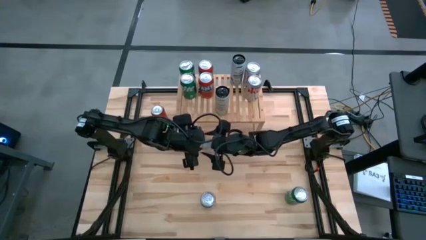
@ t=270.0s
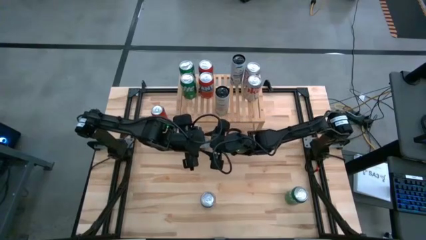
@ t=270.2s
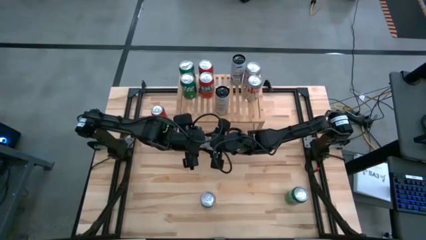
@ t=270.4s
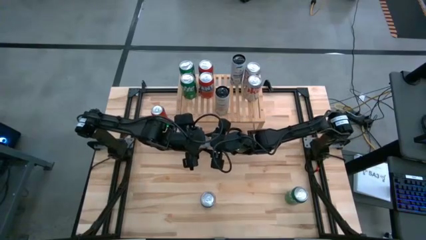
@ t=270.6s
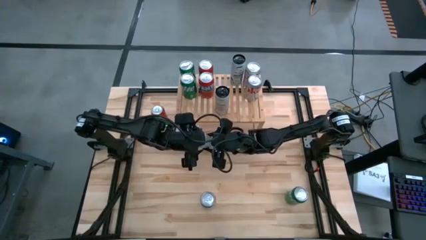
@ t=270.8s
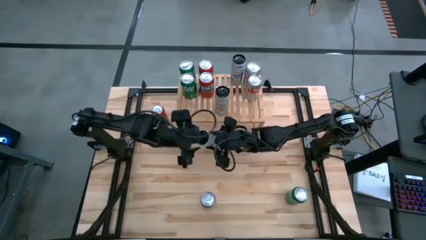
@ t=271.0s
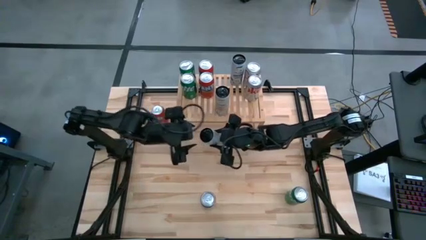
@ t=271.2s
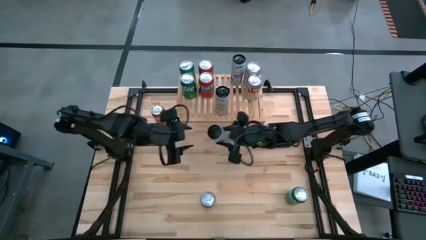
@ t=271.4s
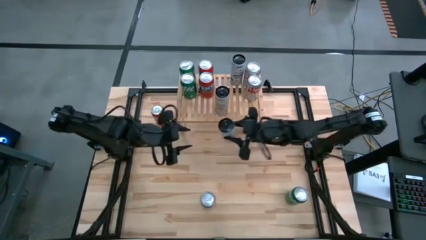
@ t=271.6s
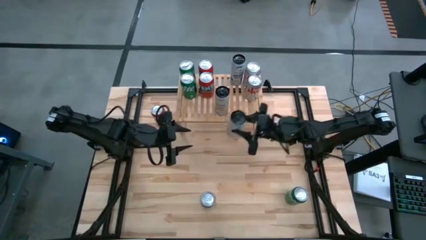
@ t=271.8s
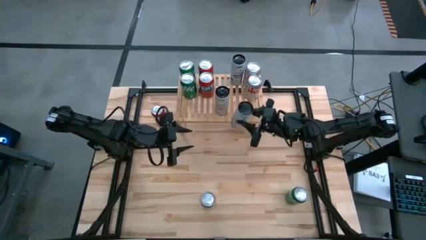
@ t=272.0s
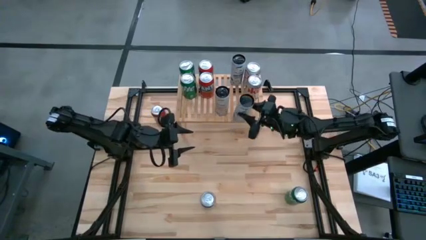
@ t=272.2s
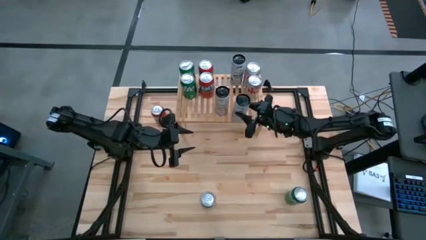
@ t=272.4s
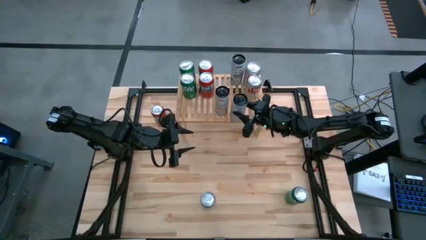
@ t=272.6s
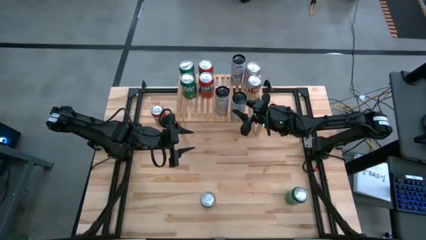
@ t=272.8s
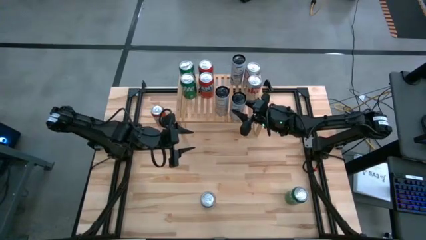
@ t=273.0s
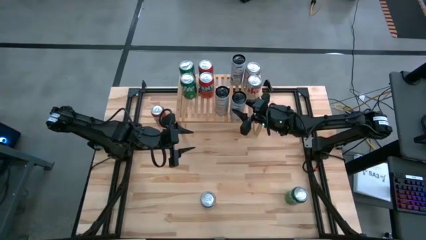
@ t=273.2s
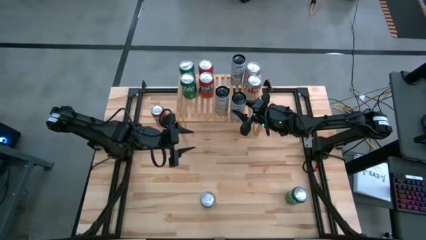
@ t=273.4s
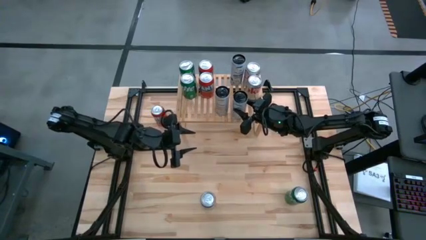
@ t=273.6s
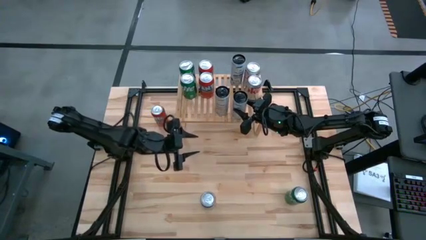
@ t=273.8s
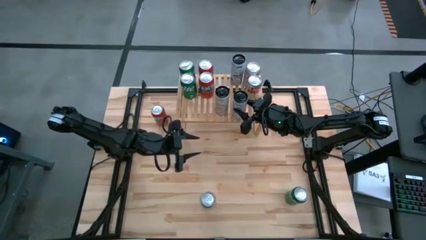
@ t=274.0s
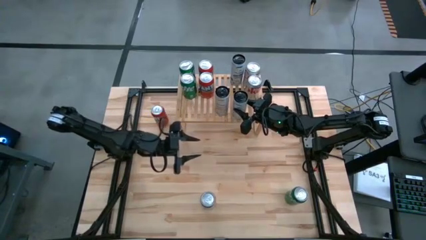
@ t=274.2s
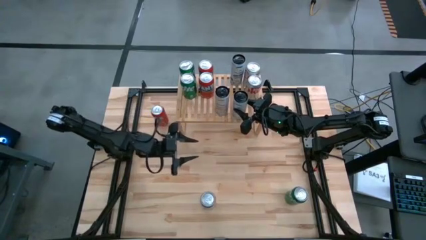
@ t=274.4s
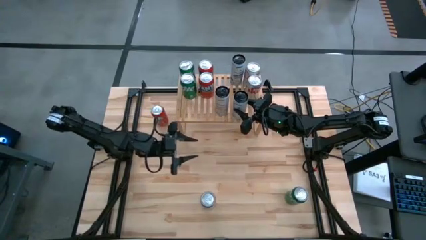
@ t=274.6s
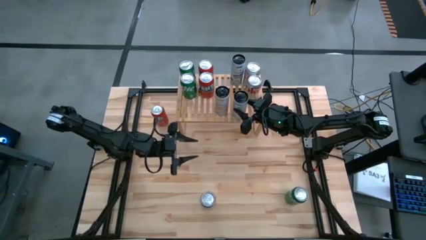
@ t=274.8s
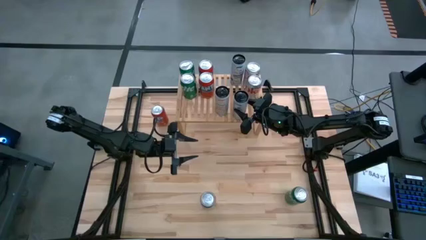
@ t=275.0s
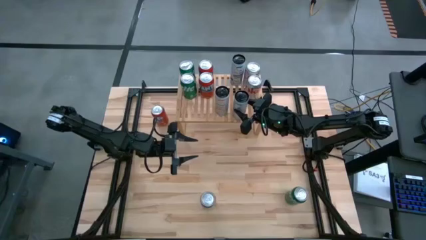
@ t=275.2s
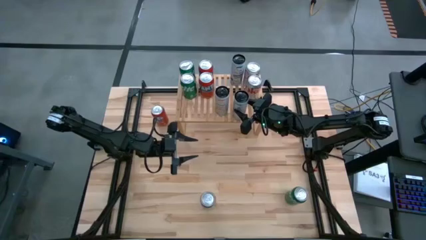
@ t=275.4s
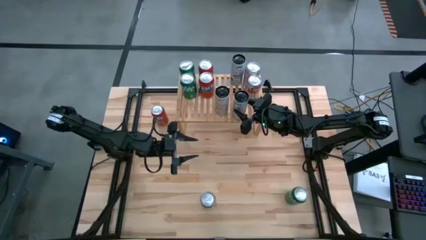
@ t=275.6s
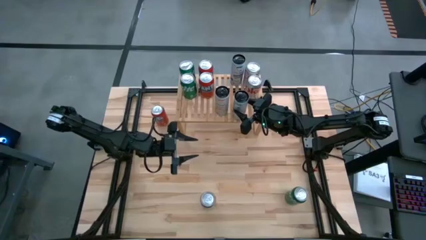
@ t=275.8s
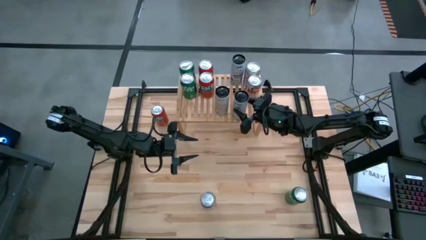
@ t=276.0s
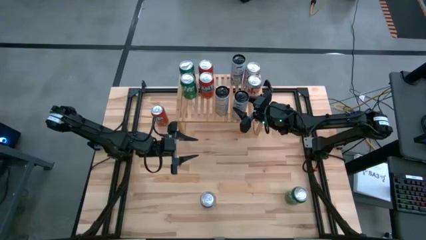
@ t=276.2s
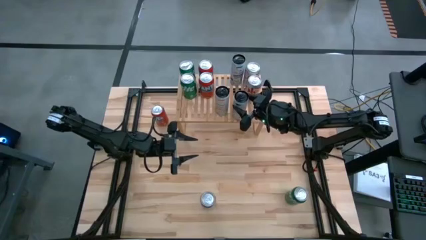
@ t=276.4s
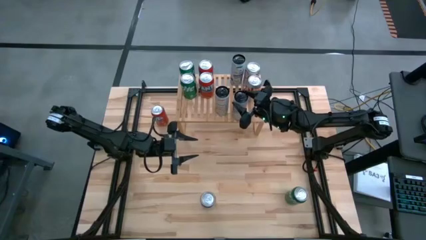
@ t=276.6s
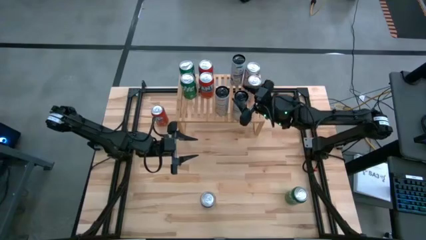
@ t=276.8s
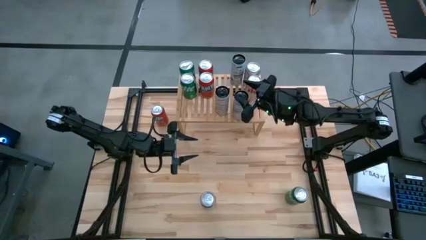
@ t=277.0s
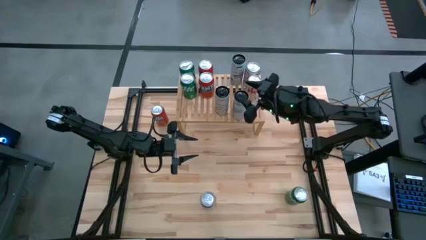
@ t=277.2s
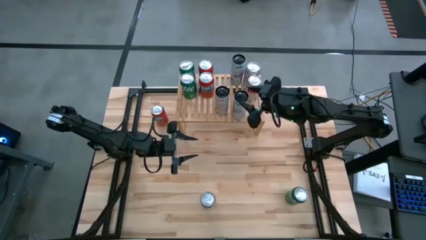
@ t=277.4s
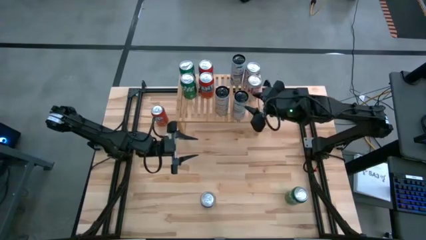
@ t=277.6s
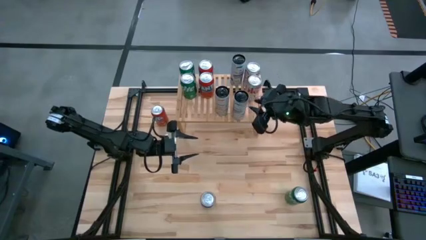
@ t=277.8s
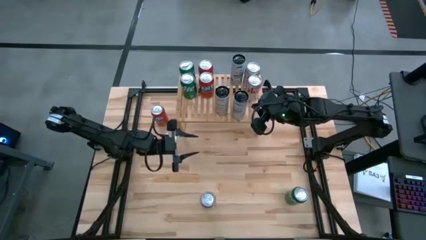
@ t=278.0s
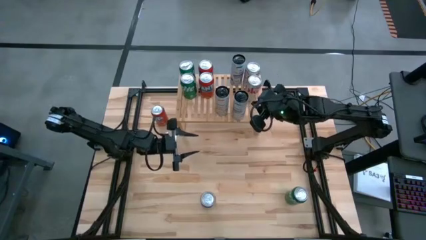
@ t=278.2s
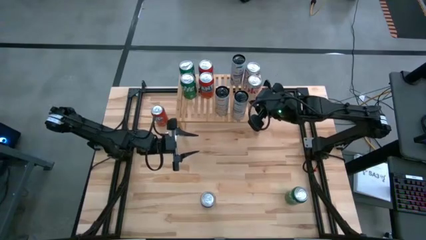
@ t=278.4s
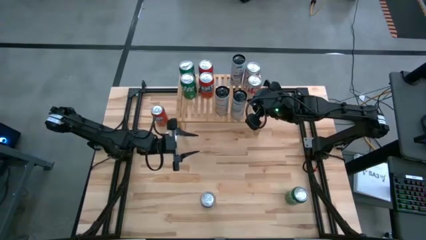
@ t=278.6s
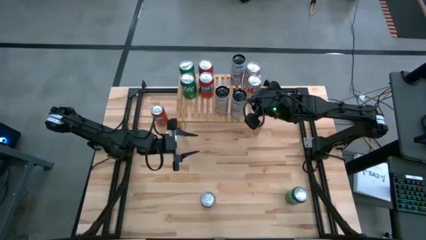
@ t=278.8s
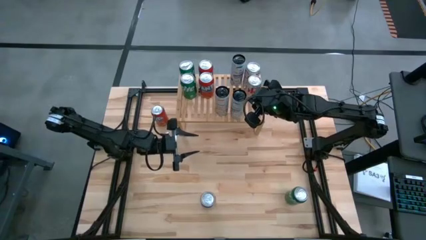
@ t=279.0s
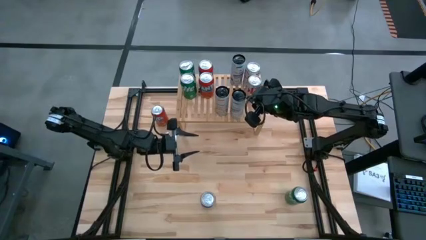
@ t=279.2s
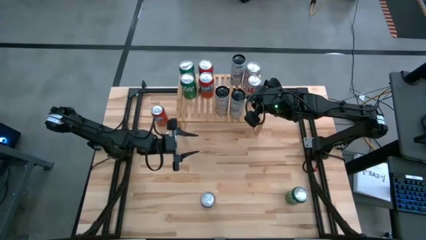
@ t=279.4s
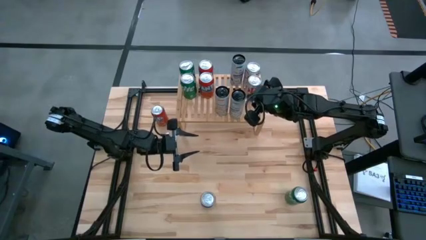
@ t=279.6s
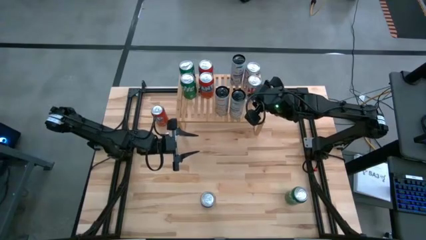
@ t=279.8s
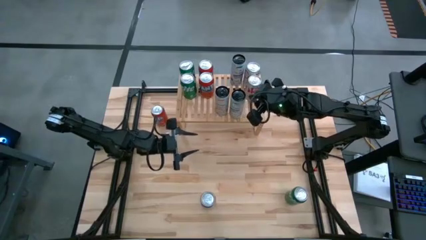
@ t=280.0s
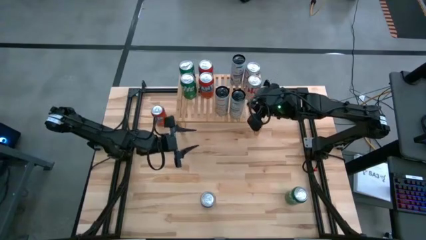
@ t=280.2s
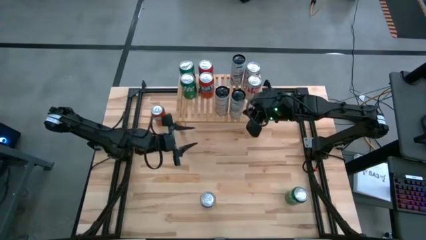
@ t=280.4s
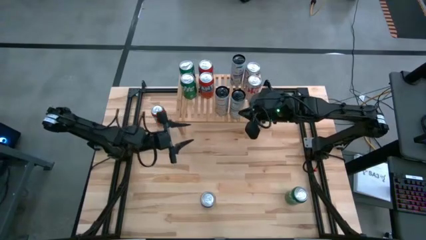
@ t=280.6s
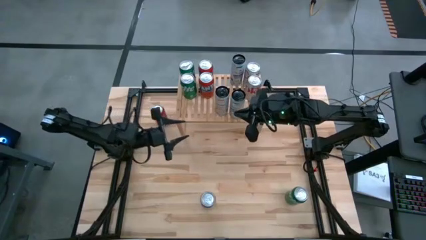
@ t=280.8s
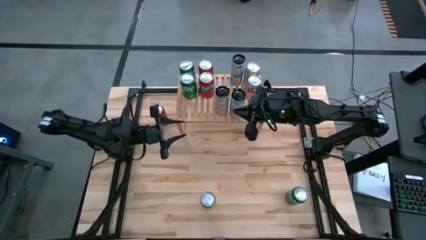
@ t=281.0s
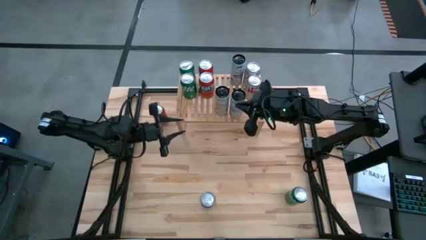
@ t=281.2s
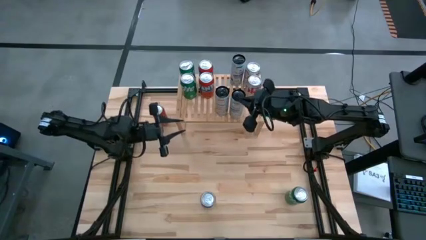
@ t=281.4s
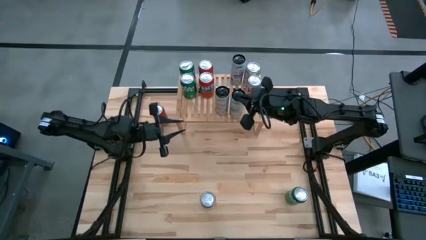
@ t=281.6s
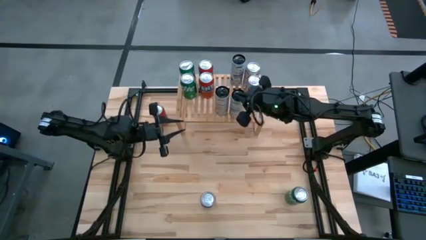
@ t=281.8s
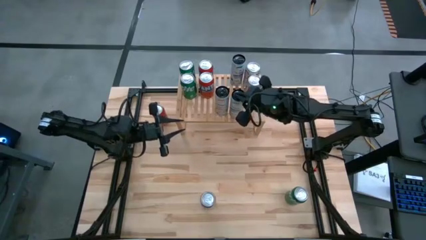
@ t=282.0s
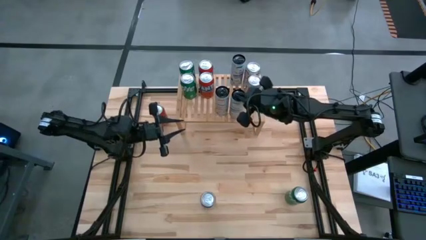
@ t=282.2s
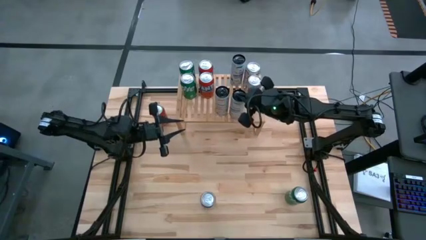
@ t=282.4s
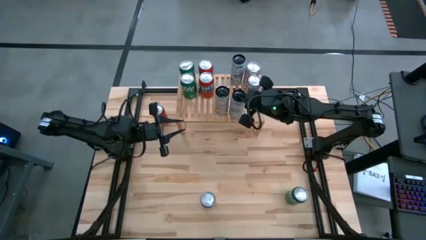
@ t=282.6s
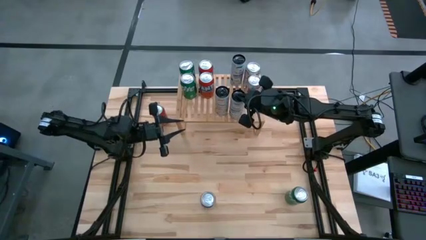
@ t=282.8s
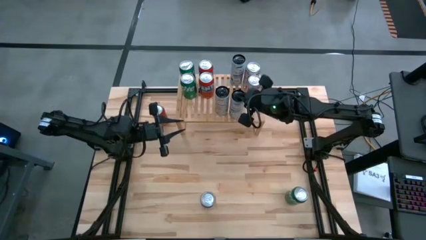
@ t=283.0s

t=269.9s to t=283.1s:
Task: Place canned beverage on shelf
Put the white blue soda can aligned with other white blue soda can on the shelf
